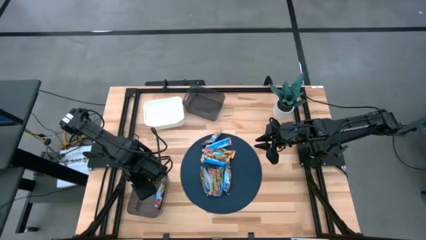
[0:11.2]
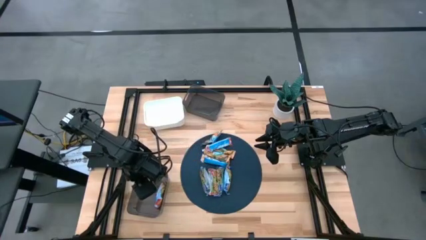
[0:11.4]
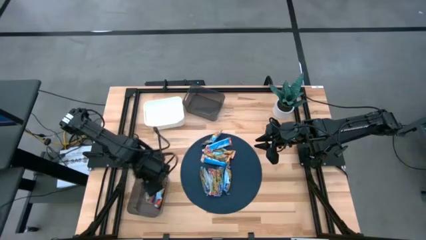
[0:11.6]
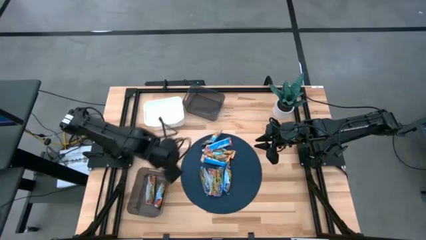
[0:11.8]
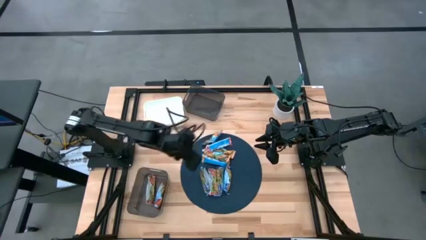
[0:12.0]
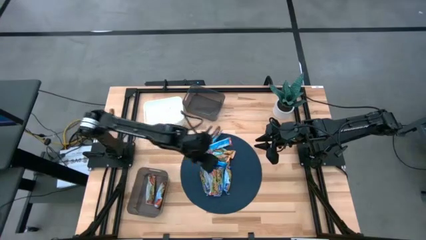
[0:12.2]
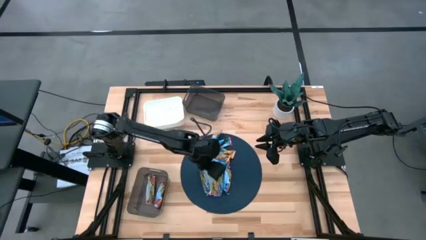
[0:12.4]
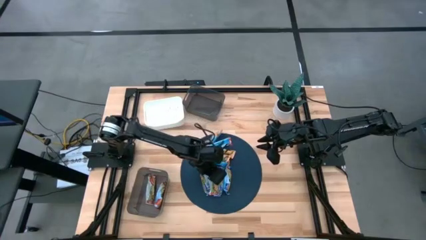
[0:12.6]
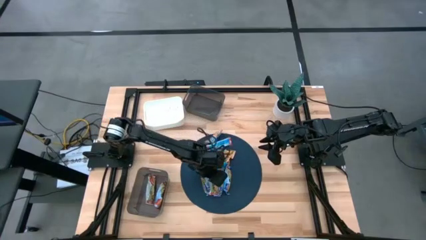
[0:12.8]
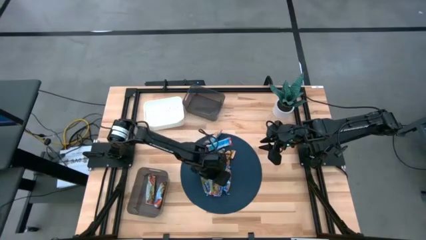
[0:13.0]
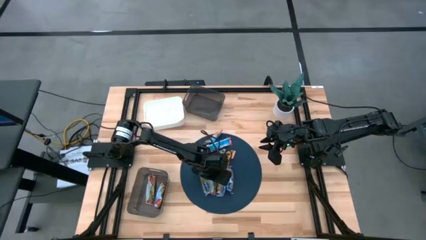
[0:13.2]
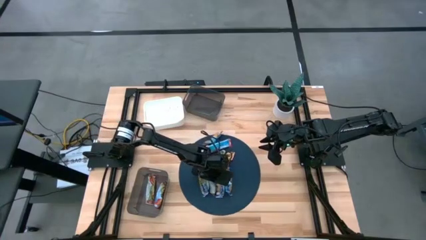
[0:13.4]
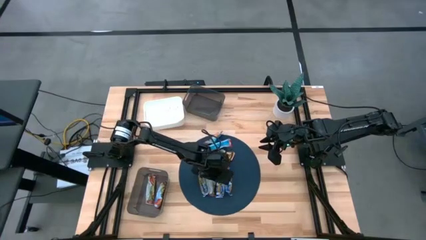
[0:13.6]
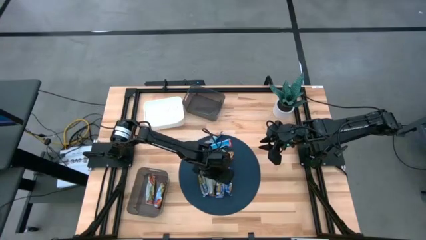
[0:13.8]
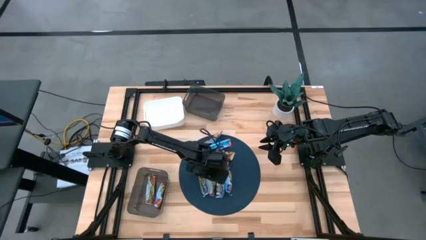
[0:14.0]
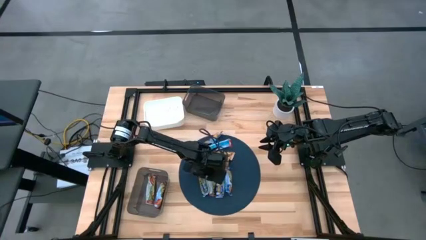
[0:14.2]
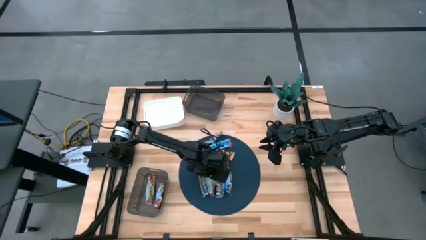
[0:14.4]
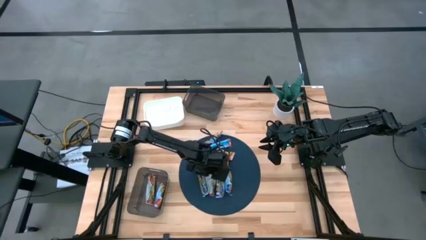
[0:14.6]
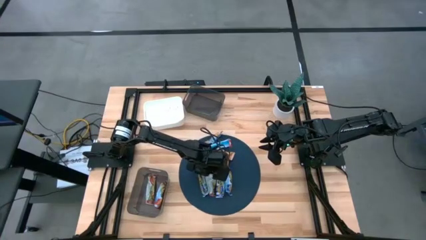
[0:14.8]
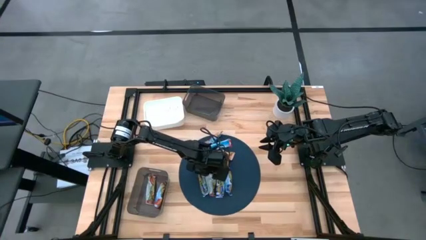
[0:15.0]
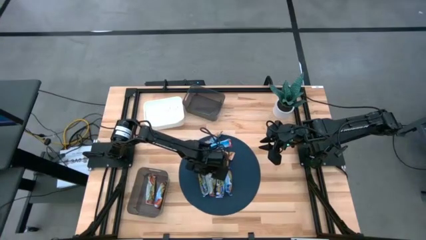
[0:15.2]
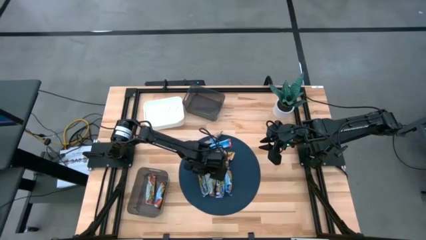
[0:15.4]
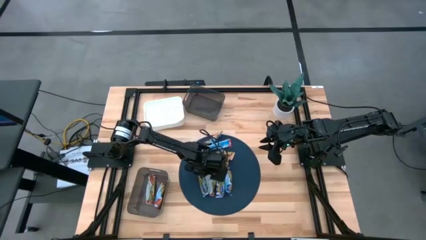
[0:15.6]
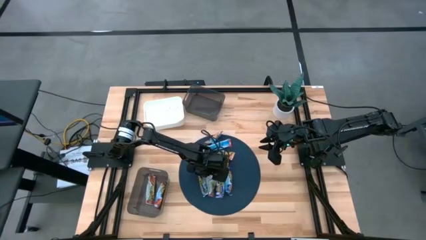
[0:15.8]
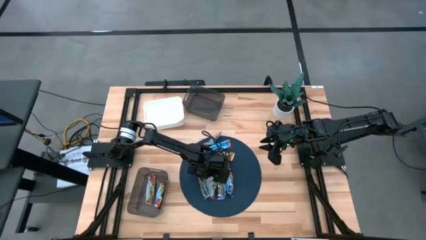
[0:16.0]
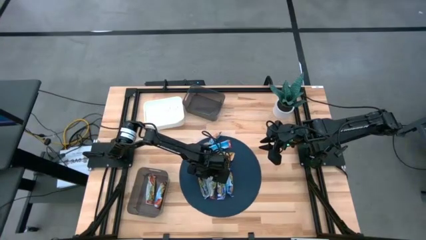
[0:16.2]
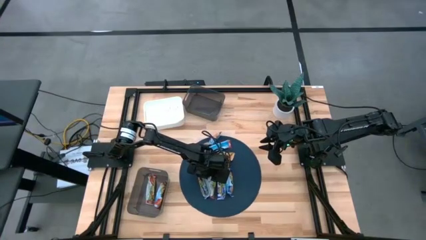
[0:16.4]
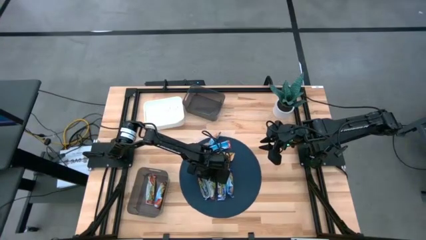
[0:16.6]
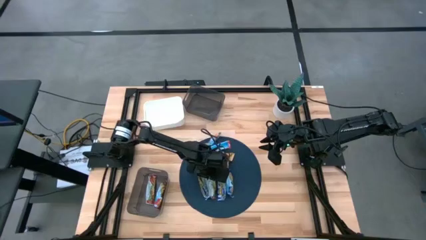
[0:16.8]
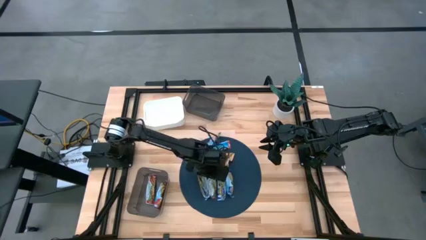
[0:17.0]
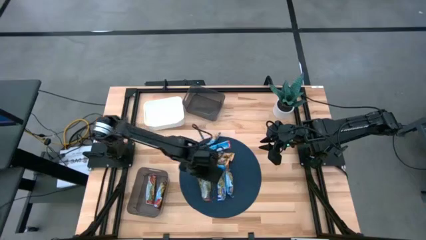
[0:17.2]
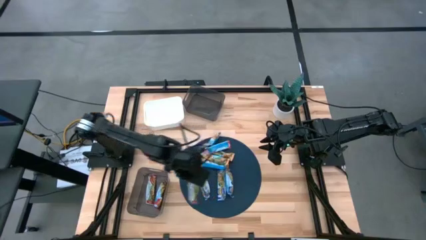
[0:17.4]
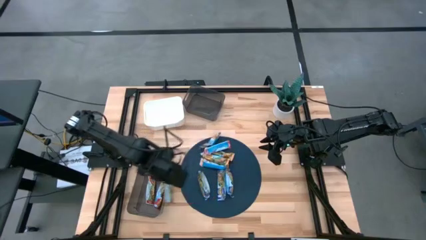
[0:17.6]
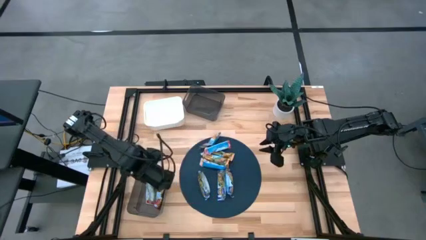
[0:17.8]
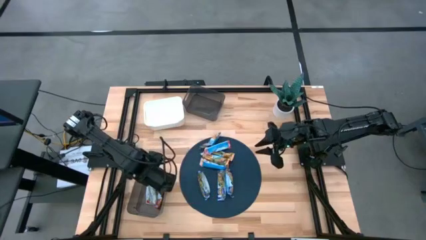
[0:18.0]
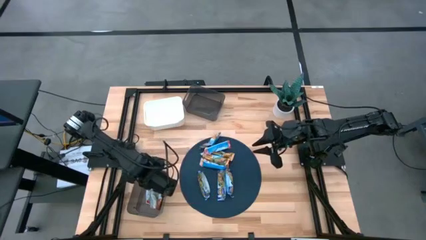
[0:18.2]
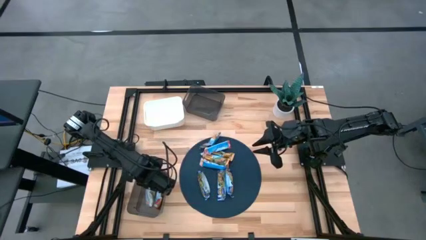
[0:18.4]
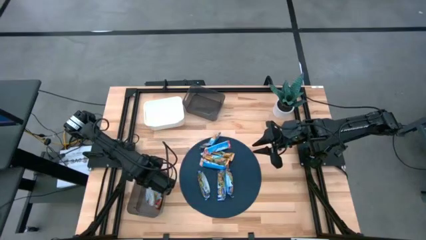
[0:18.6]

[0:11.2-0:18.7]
Task: Pick and place Granola Bars by type
Put the red granola bar into the bottom black bin

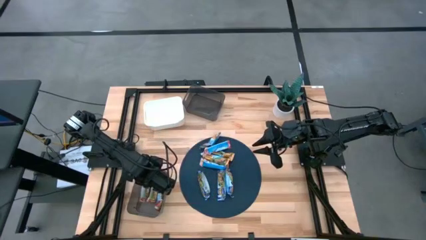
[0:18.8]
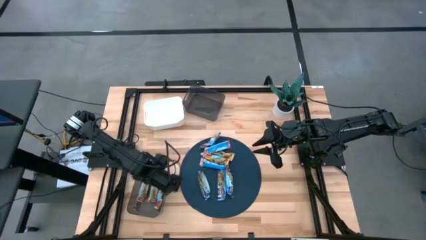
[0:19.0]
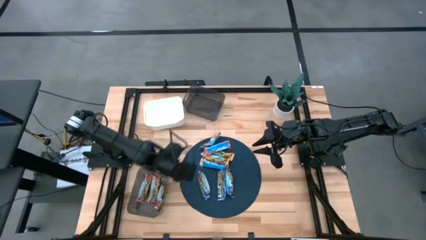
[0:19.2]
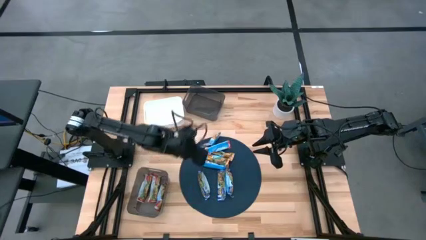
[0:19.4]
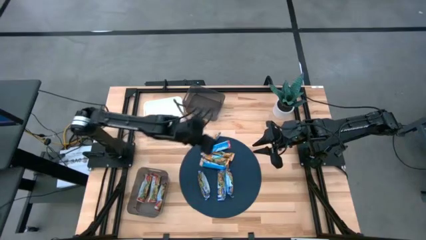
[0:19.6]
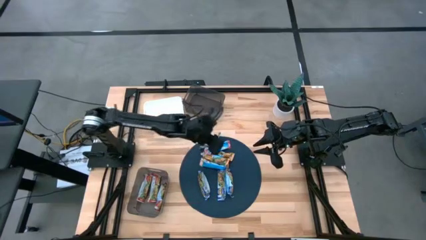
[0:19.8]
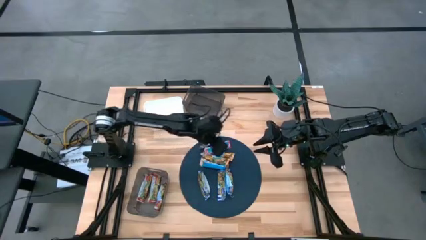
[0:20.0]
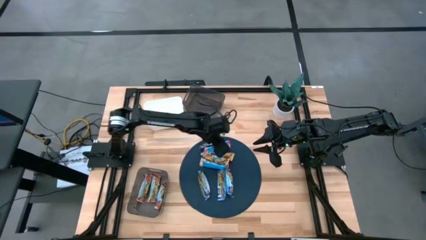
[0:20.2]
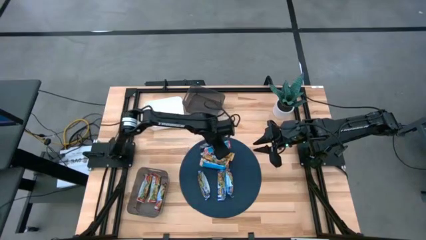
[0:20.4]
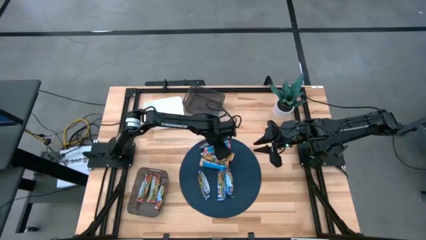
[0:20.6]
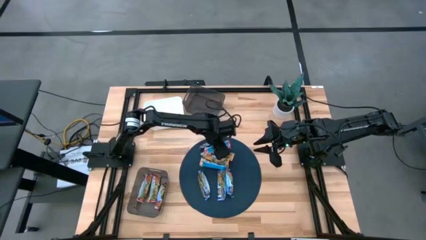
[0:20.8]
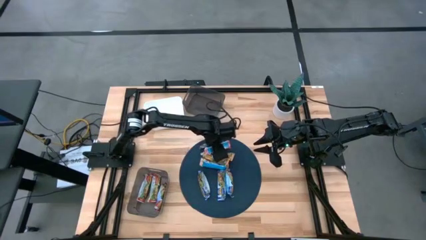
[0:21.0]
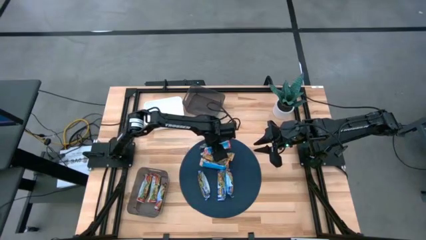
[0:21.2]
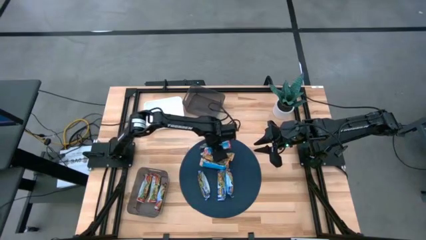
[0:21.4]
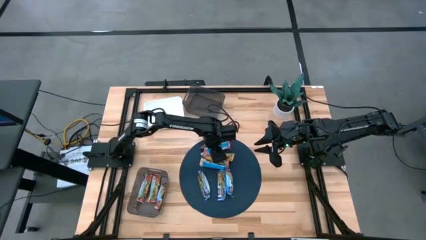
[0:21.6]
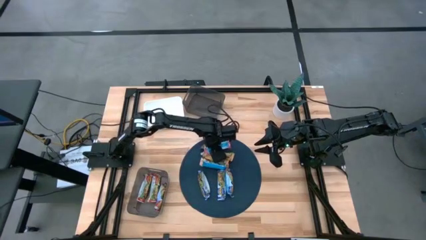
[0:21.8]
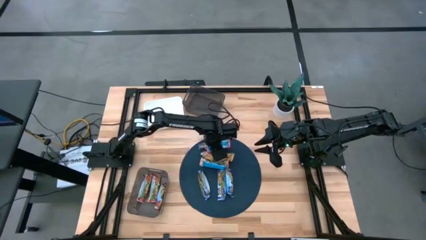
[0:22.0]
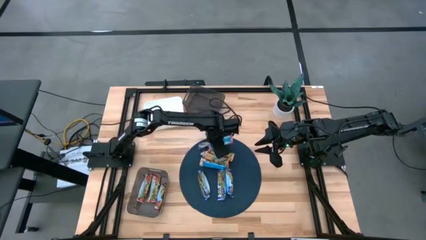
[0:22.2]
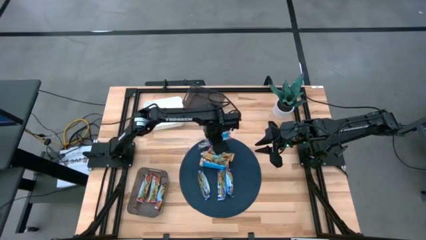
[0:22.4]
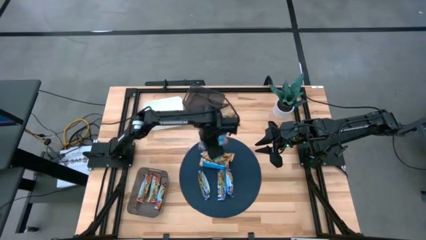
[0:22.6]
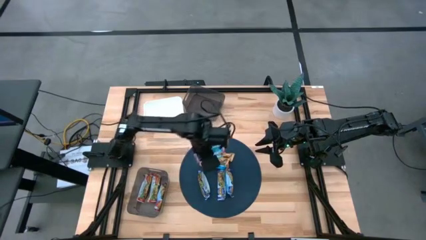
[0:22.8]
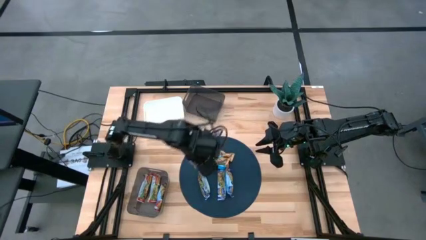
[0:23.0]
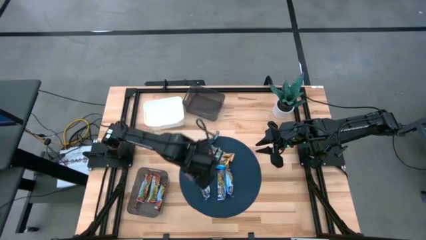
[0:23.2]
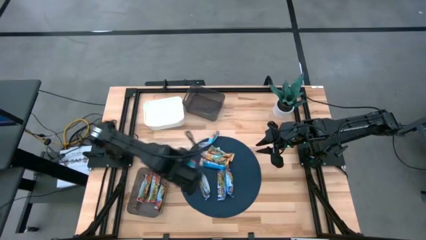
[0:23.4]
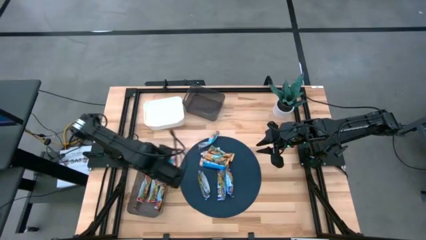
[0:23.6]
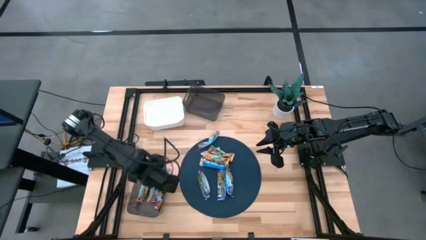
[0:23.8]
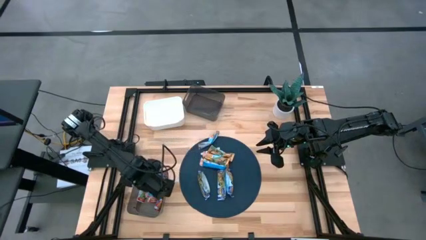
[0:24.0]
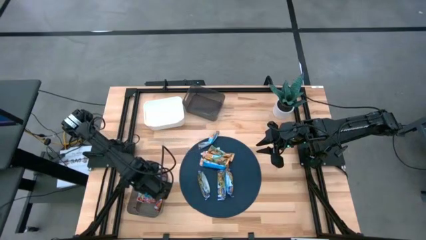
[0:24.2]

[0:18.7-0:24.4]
Put the red granola bar into the bottom black bin

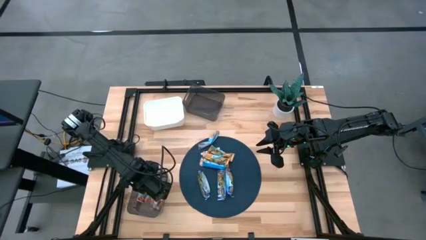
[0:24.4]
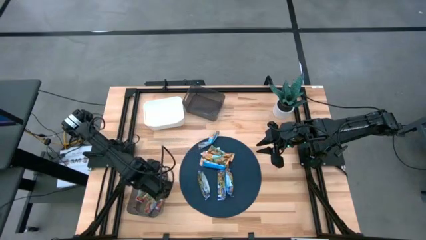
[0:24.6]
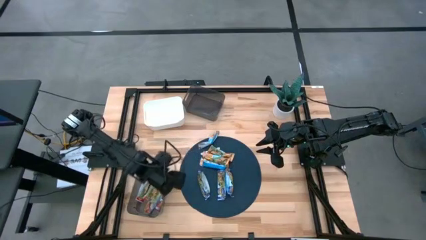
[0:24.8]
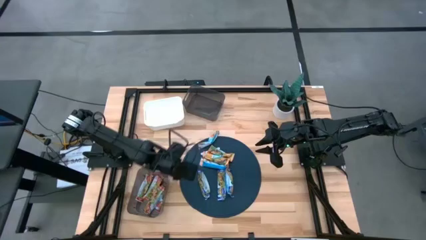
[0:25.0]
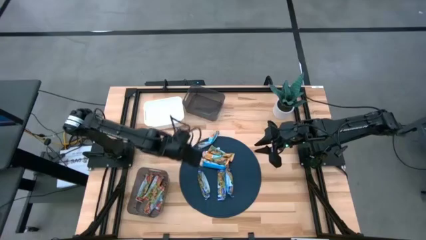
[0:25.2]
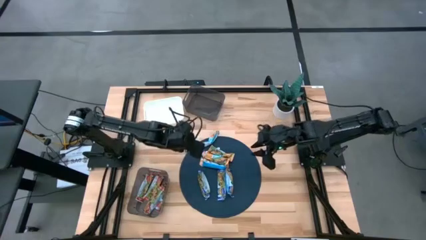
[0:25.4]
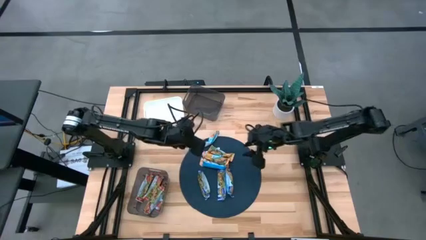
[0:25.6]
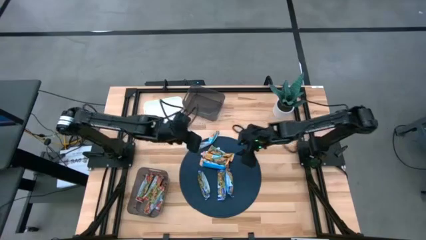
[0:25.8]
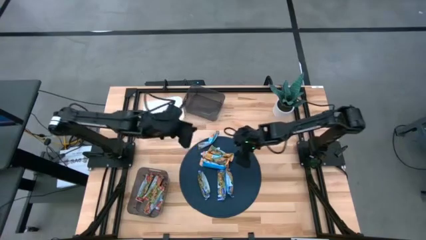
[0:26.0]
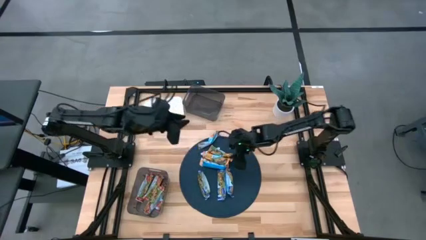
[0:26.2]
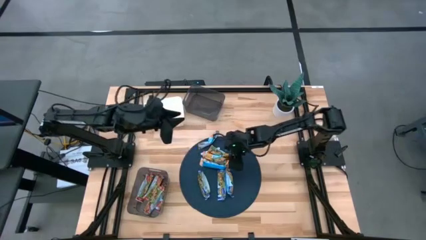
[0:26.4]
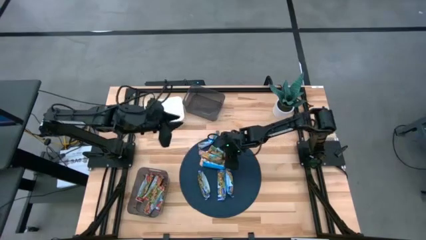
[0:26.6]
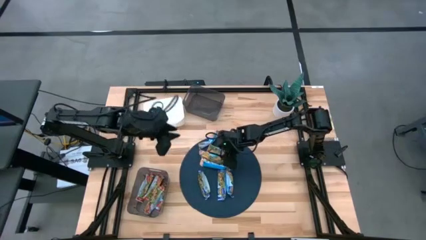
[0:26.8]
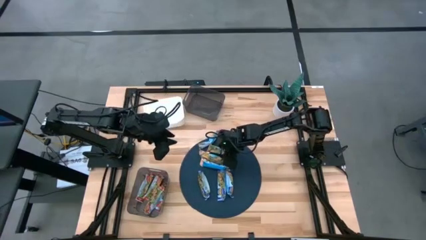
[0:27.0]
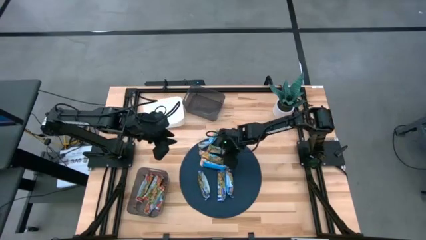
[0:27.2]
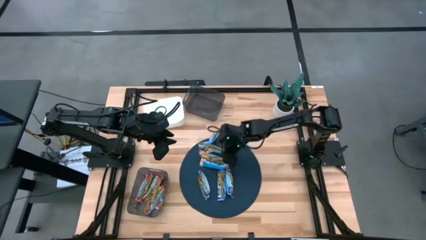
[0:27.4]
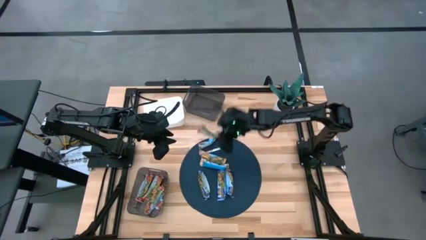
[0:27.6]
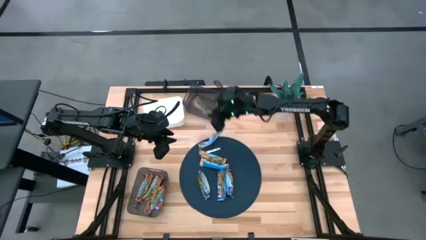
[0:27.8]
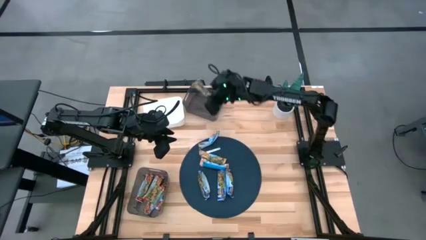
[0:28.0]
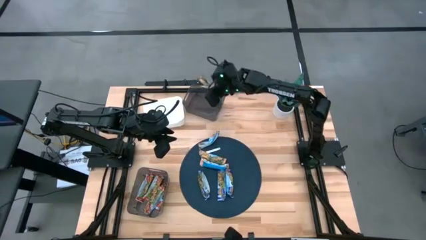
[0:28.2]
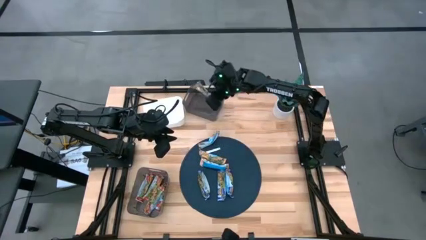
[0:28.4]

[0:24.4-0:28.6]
Put the yellow granola bar into the top black bin
